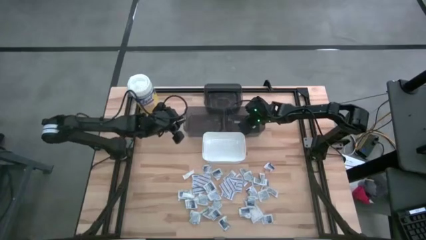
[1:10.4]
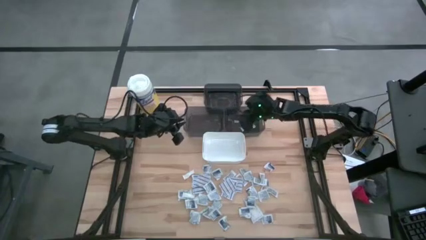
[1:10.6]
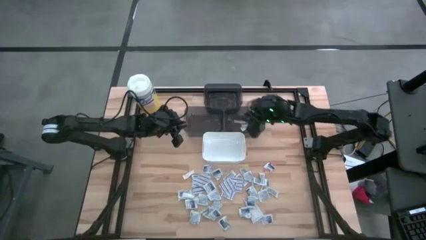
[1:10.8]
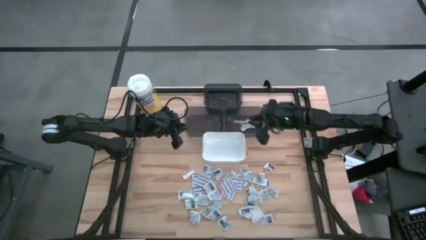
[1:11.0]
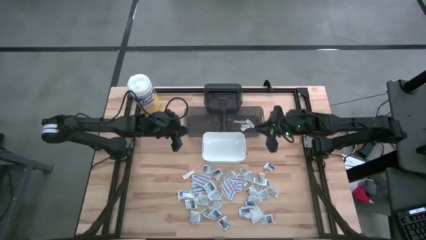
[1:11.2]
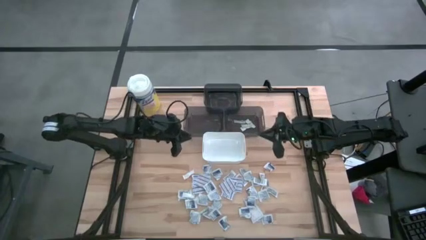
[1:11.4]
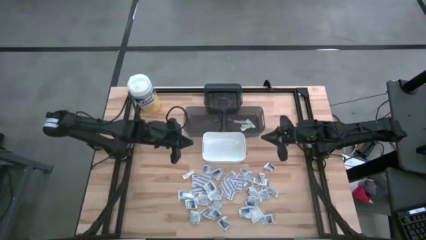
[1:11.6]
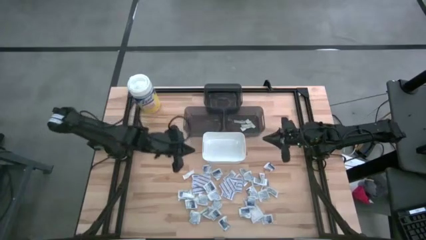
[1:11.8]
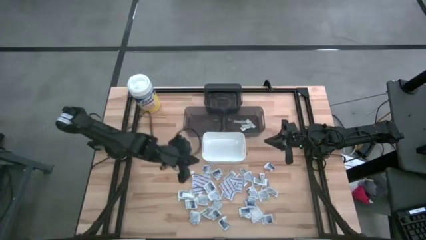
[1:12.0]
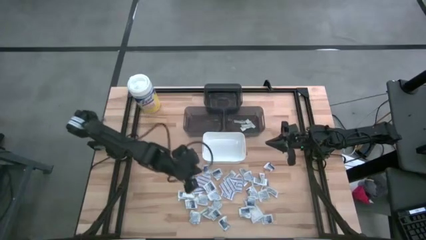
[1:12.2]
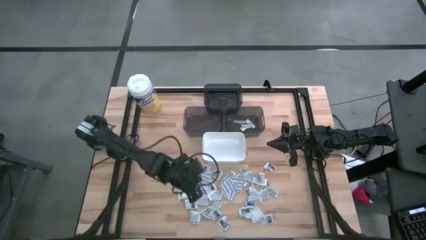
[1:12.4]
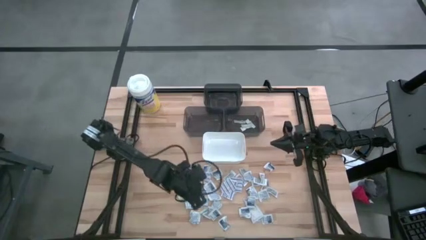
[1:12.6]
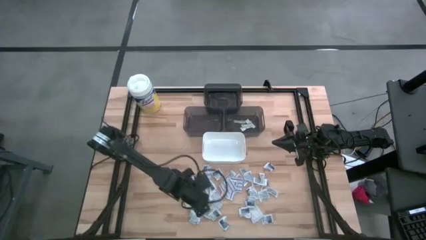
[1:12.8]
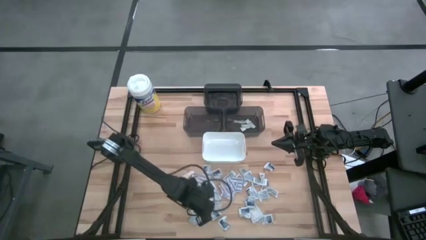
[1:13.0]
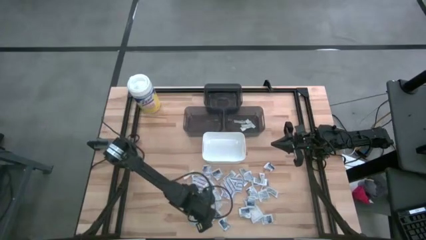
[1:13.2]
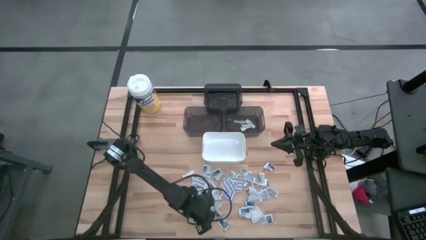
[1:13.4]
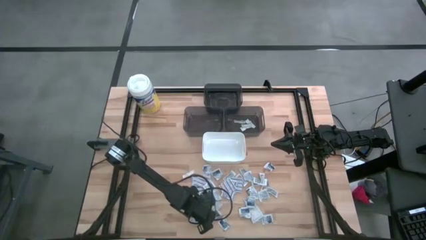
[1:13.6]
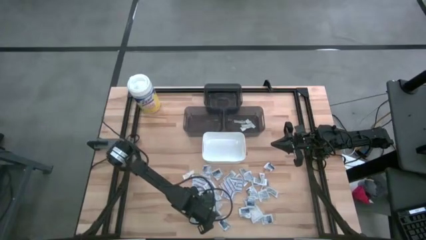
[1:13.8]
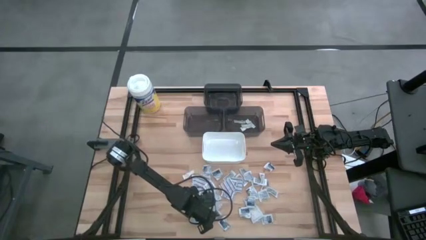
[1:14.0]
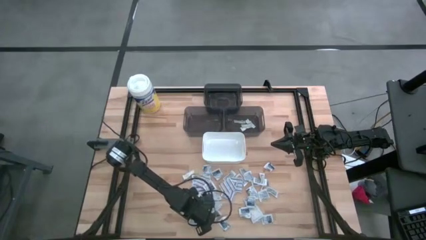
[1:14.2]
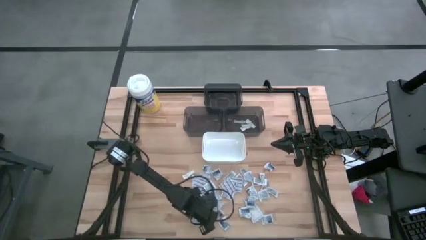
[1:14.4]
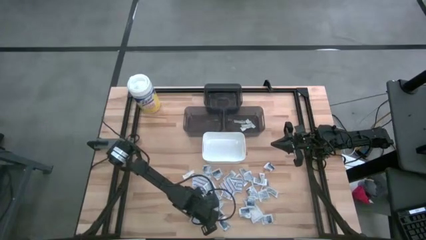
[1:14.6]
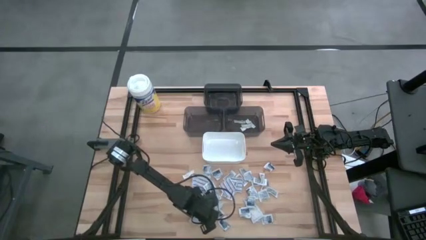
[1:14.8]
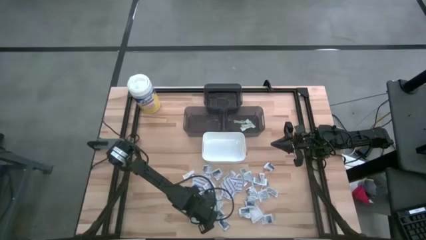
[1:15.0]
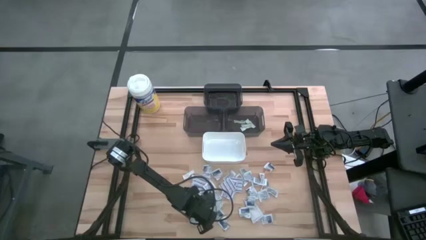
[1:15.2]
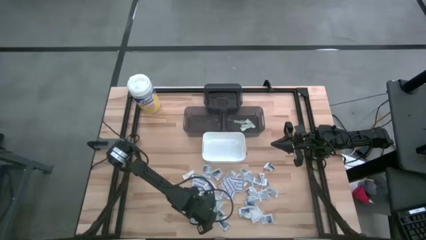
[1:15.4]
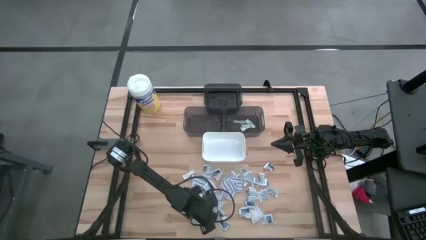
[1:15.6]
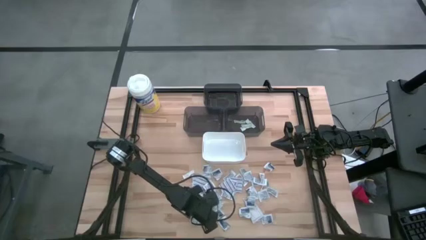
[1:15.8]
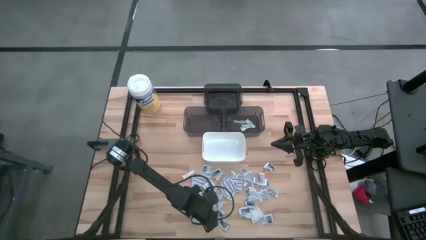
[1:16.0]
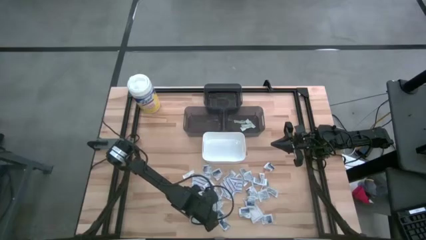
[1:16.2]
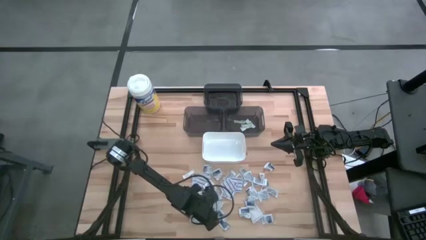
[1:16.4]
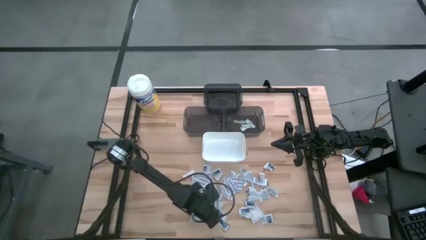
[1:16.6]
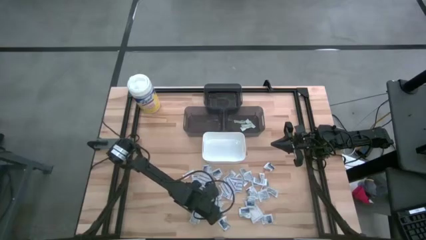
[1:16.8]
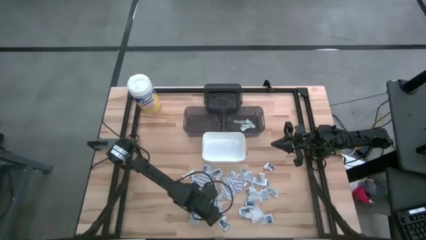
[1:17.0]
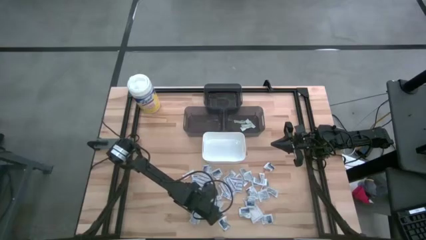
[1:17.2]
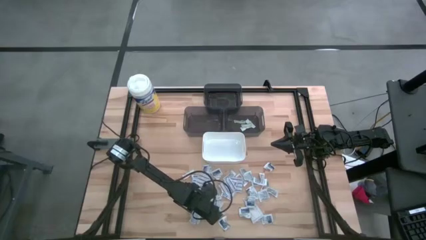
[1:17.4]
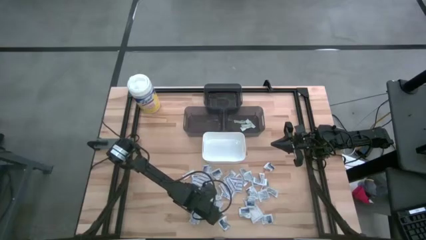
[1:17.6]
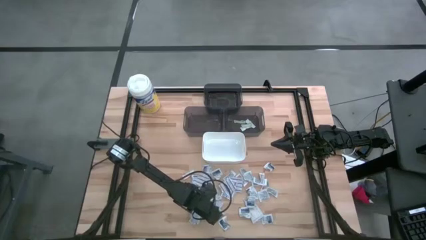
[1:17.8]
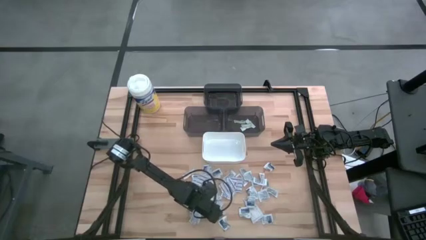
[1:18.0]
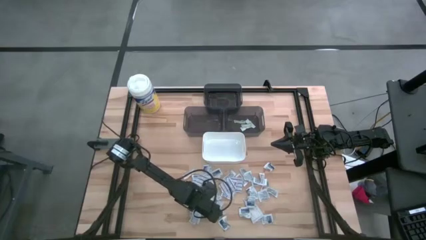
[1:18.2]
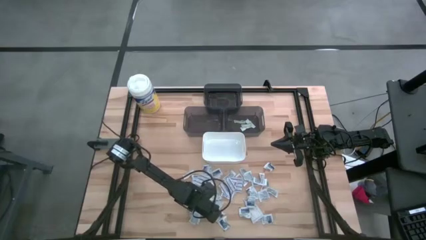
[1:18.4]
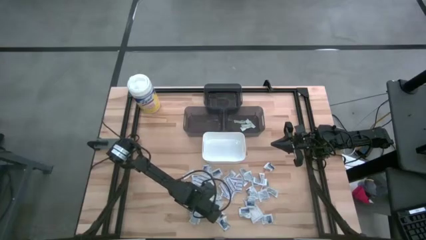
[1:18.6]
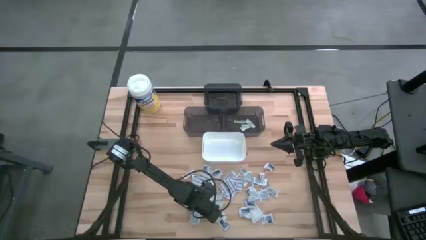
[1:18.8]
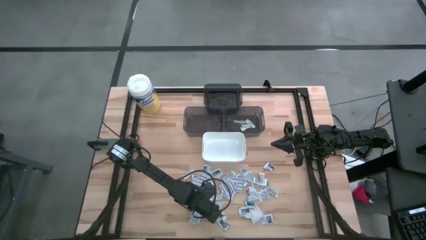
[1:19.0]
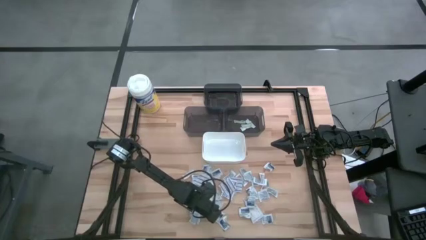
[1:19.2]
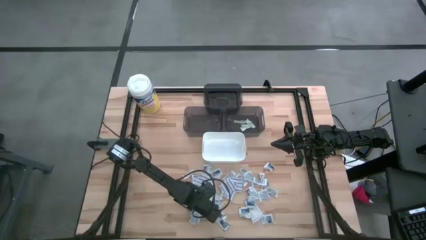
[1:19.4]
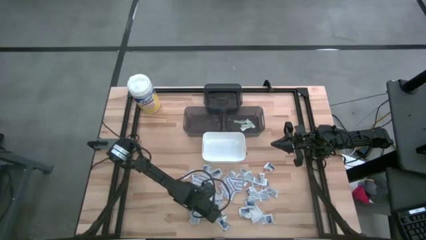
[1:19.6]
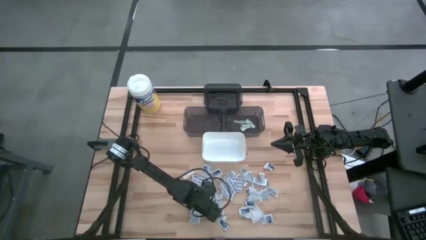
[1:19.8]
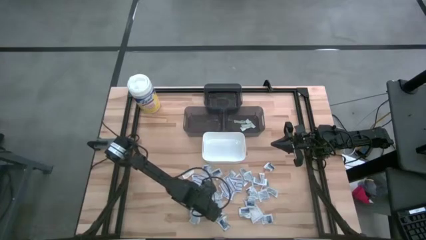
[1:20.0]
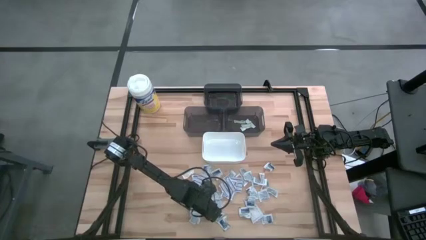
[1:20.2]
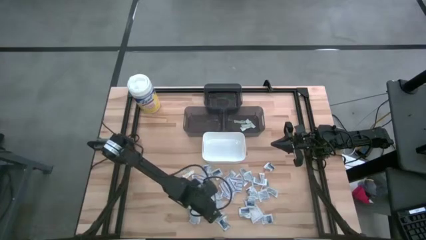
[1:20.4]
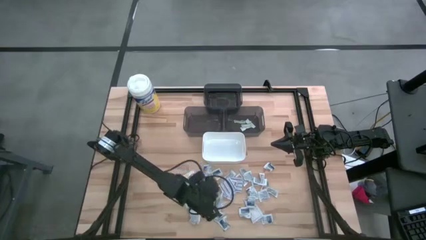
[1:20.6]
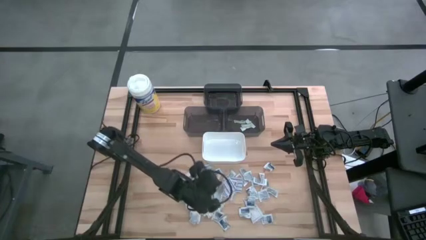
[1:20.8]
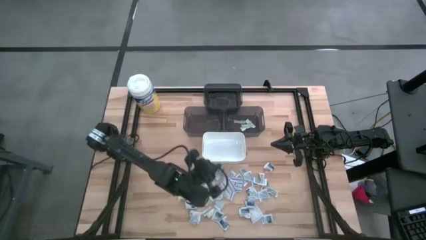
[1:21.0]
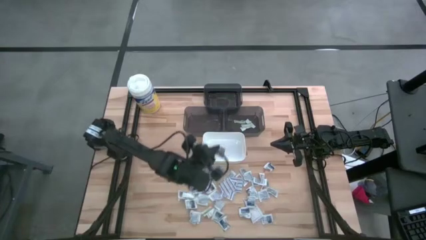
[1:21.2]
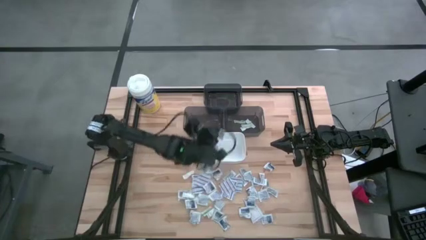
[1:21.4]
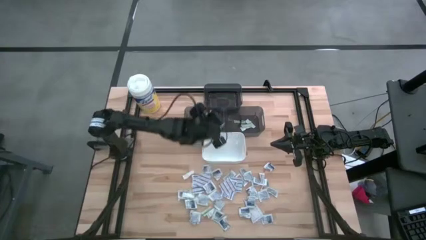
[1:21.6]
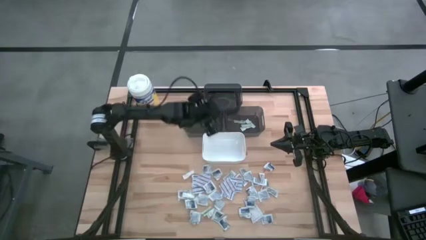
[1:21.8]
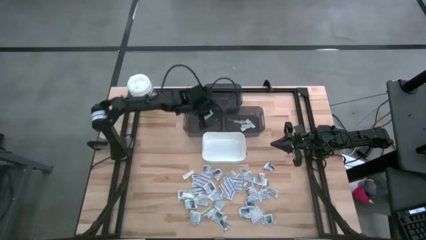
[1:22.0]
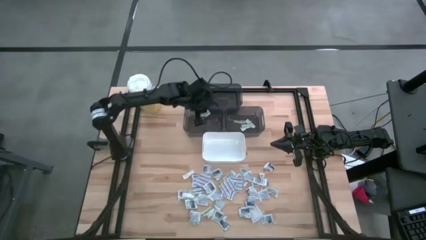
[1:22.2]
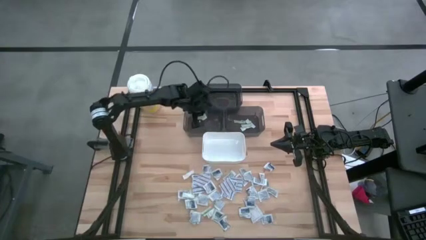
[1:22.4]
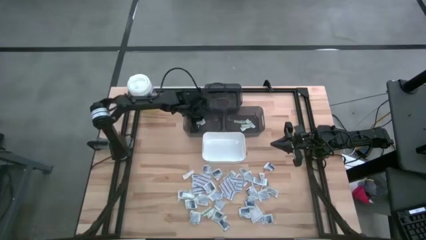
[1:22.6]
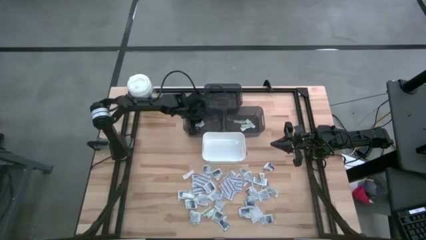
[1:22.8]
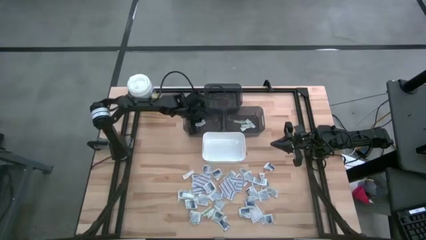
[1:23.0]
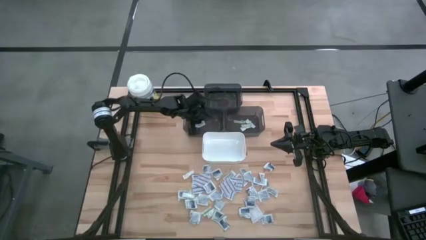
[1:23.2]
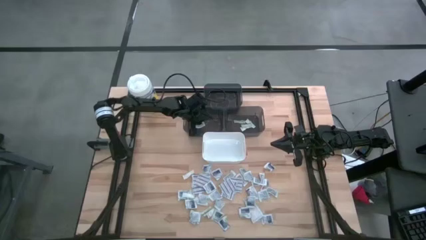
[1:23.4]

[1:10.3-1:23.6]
Task: Pick & Place First Aid Supplies
Put the alcohol pad into the bottom left black bin

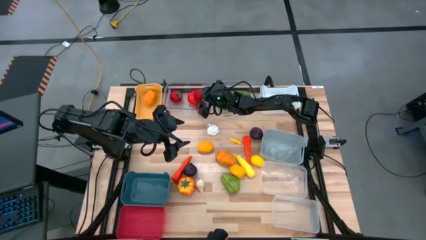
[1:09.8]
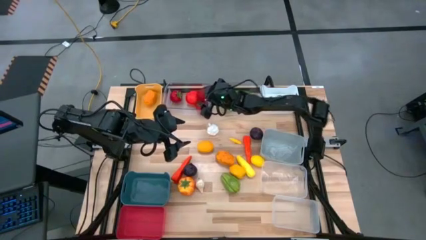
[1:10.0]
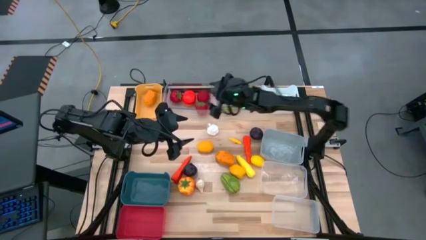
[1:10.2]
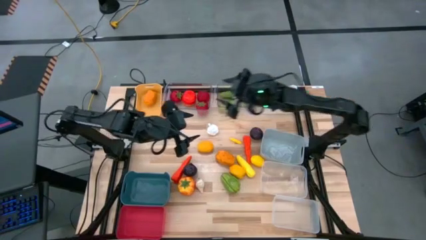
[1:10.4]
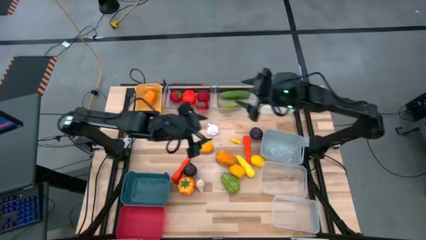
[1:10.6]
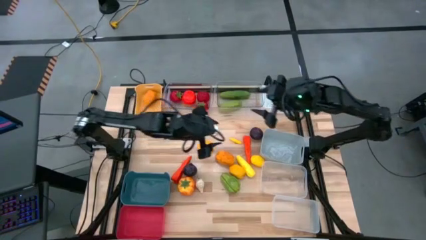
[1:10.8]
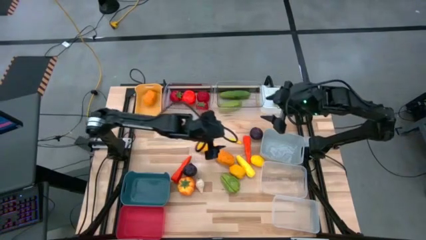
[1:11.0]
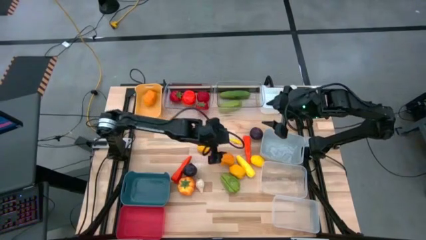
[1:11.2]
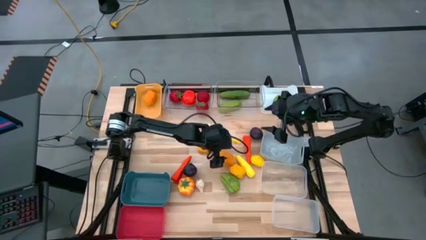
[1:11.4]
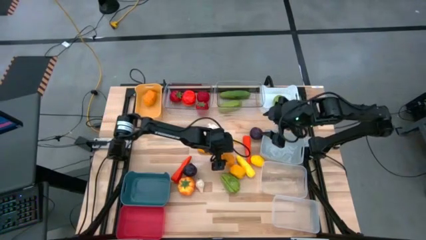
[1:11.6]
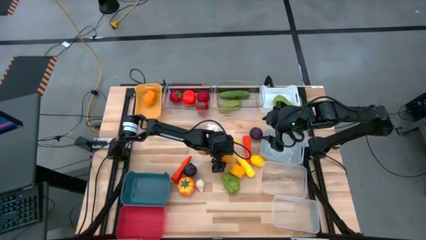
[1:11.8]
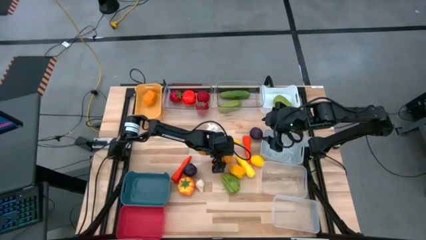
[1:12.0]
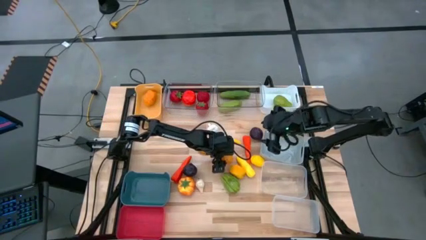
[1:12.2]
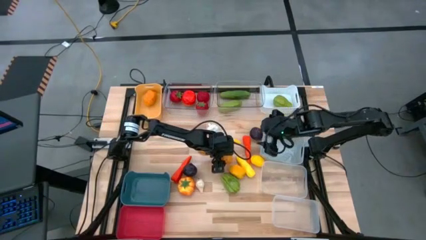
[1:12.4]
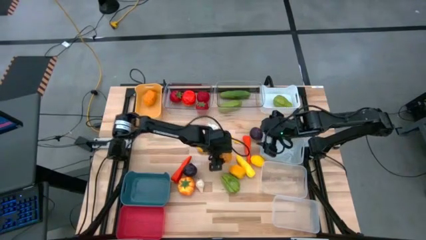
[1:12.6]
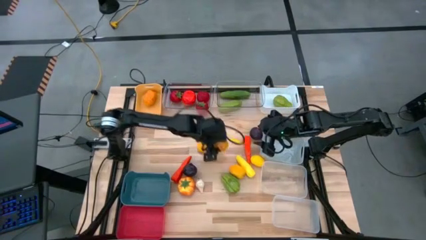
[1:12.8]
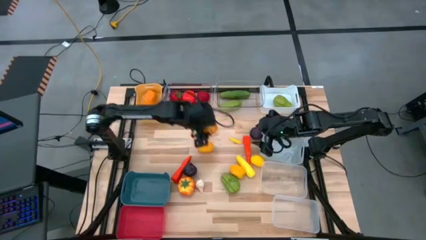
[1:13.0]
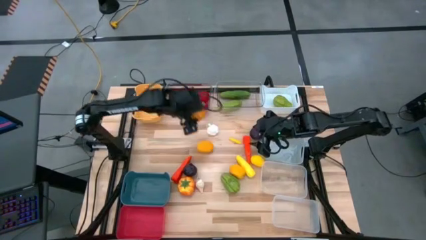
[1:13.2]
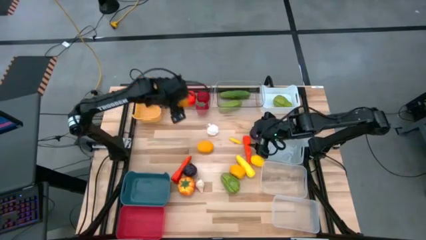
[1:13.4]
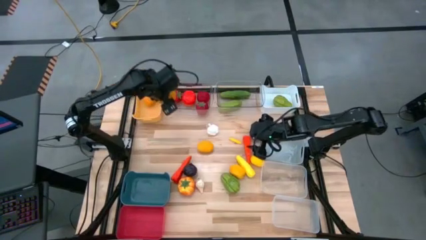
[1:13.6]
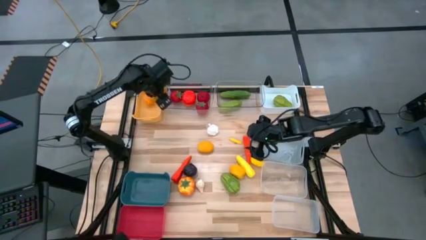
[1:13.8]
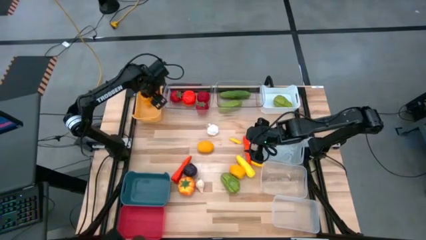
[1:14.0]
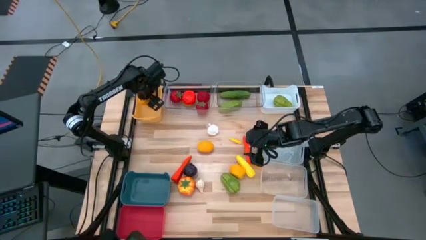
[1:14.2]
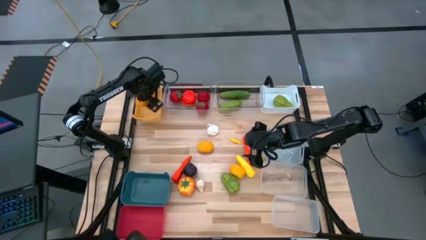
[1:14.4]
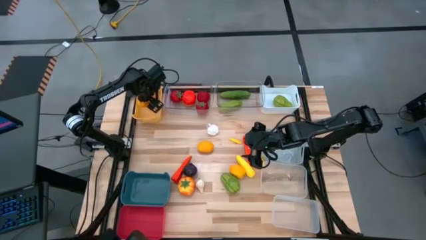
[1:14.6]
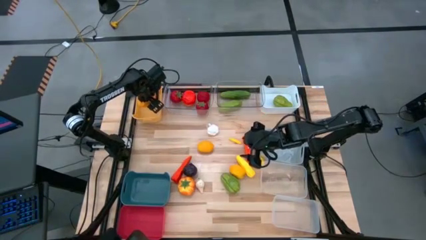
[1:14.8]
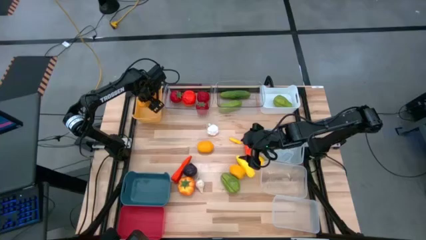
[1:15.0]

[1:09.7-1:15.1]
Task: Sort produce into baskets
Put the brown potato into the yellow bin
